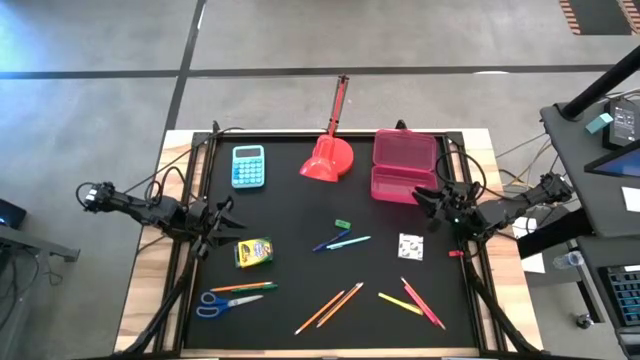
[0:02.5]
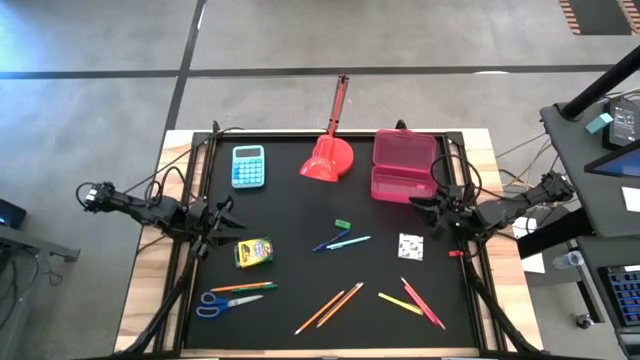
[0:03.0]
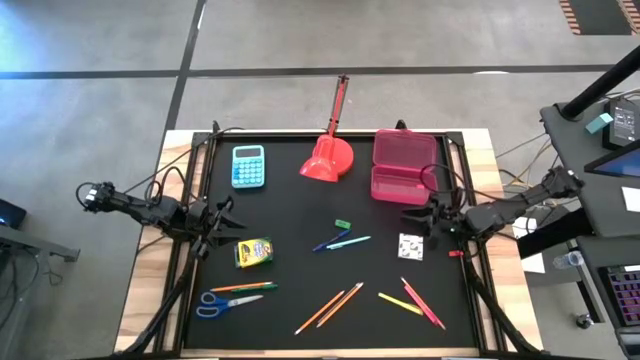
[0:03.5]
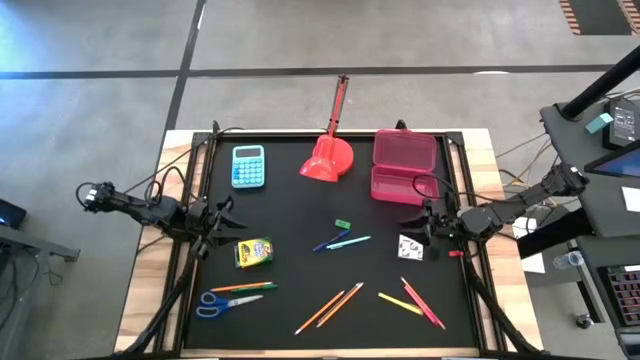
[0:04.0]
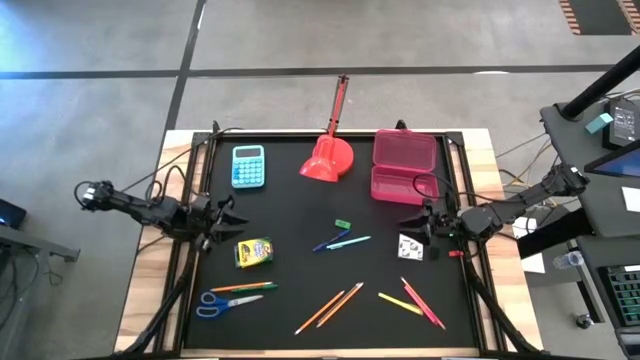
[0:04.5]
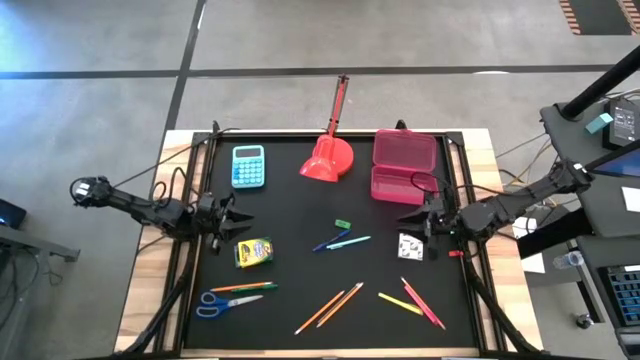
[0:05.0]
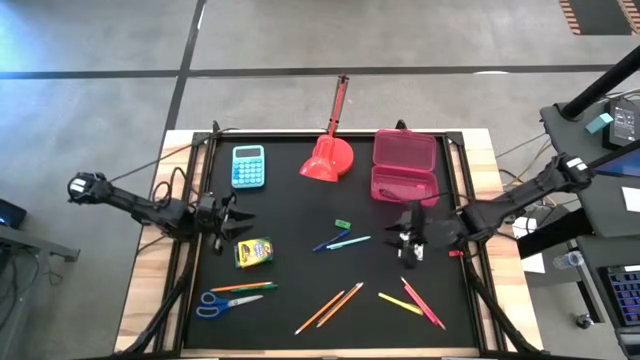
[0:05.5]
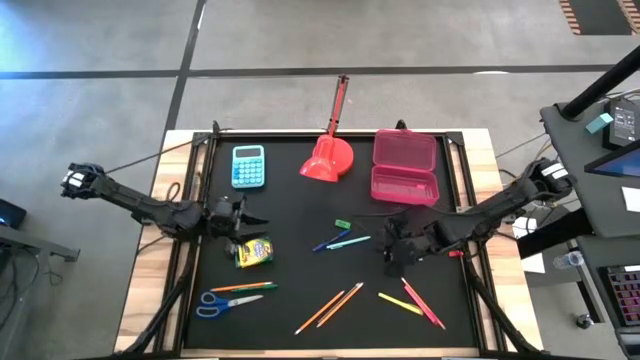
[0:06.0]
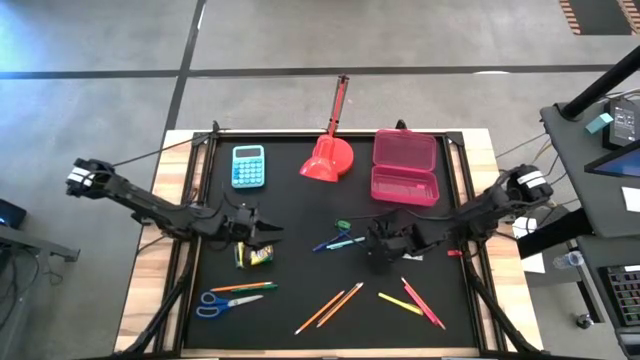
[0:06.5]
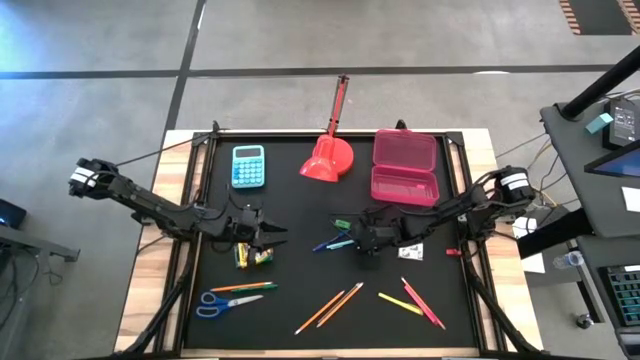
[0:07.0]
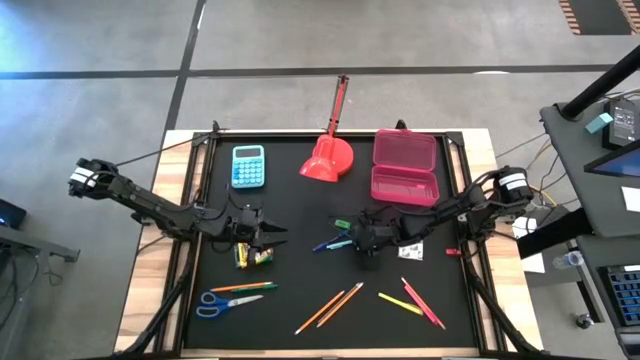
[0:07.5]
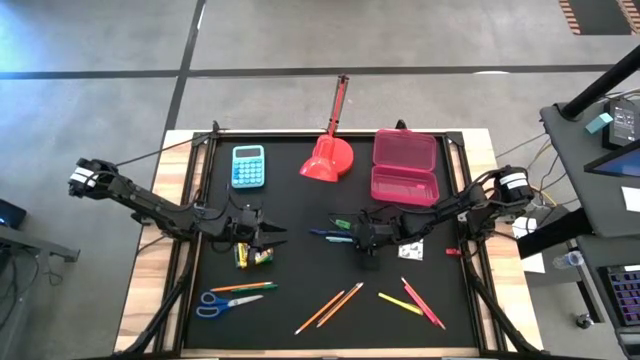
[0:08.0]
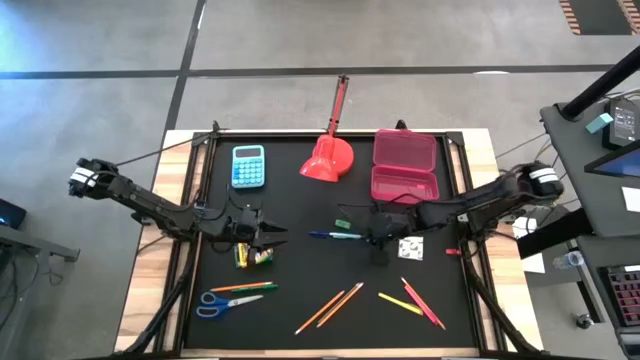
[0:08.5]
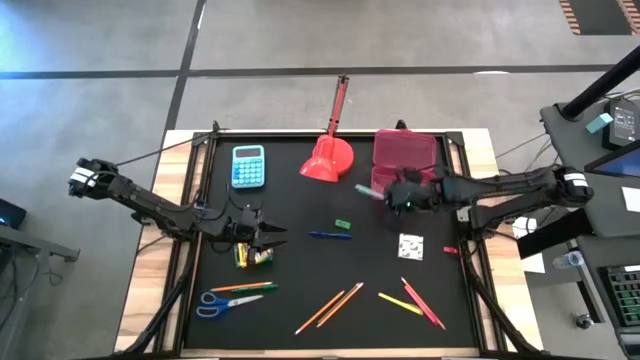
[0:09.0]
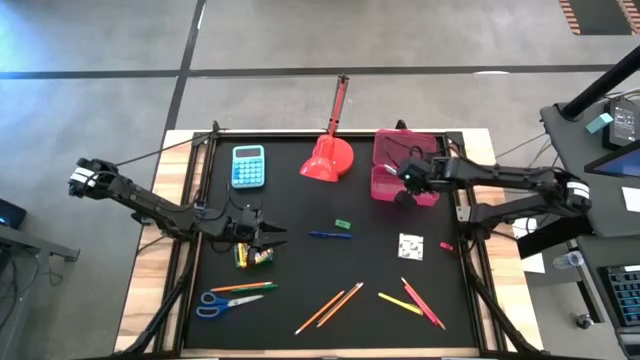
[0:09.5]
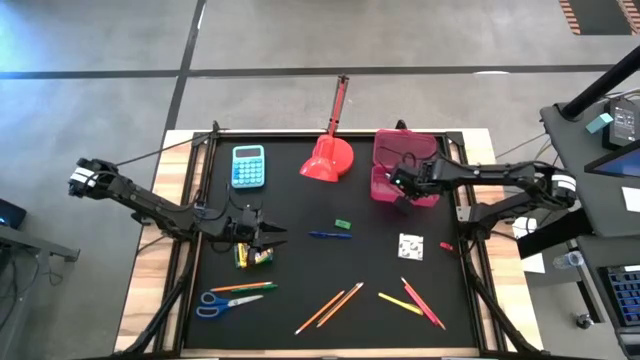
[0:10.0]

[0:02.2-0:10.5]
Task: Pack school essentials
Put the light blue pen into the pink supply box

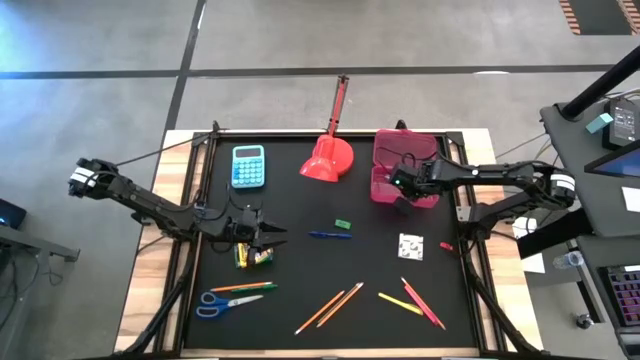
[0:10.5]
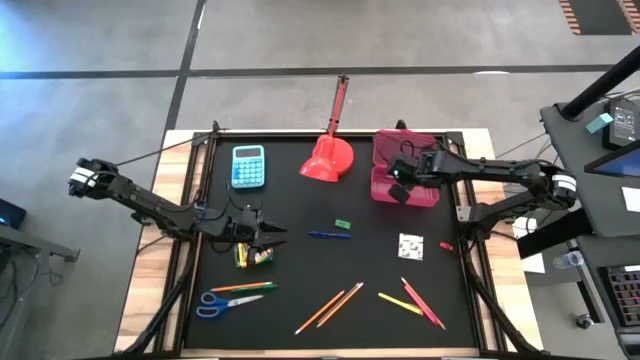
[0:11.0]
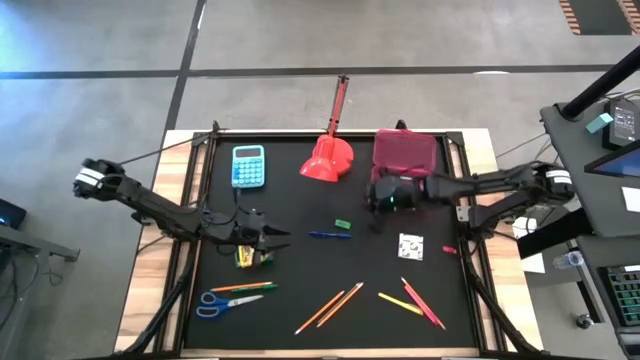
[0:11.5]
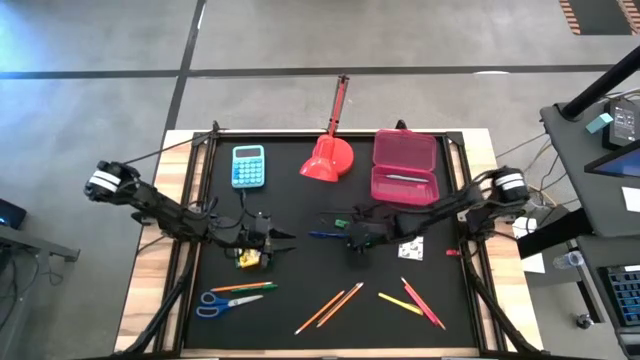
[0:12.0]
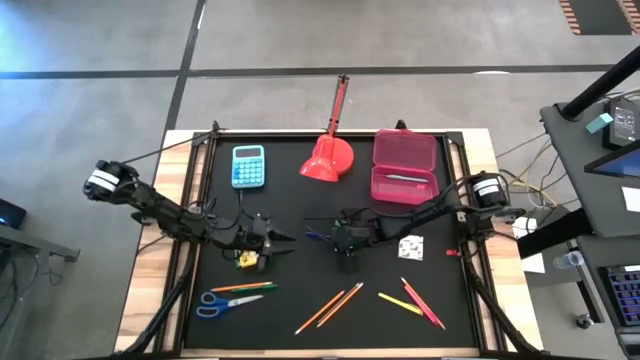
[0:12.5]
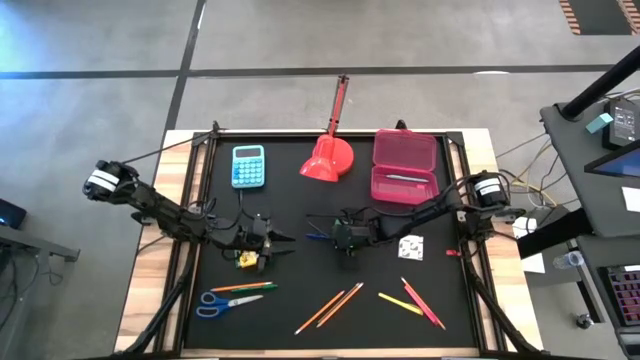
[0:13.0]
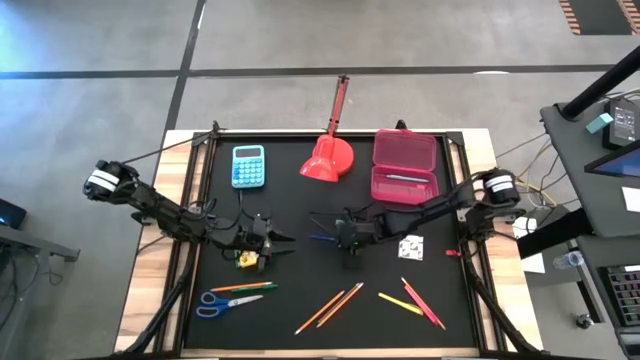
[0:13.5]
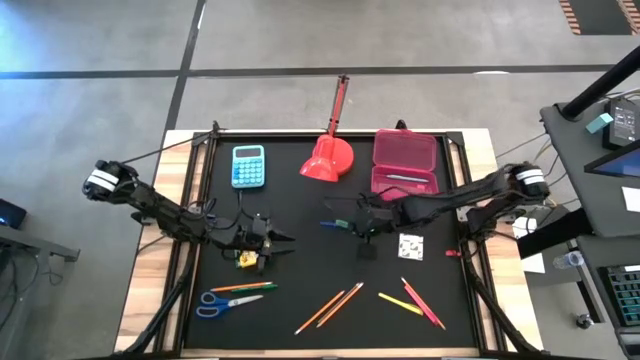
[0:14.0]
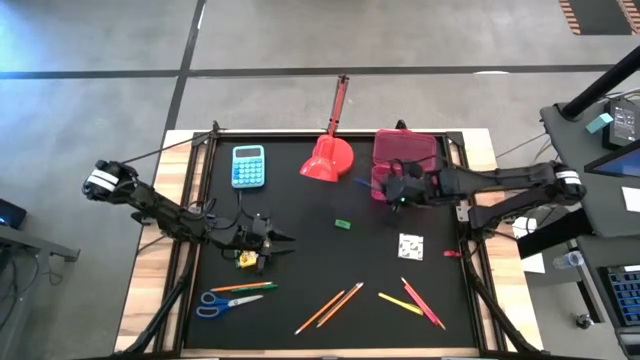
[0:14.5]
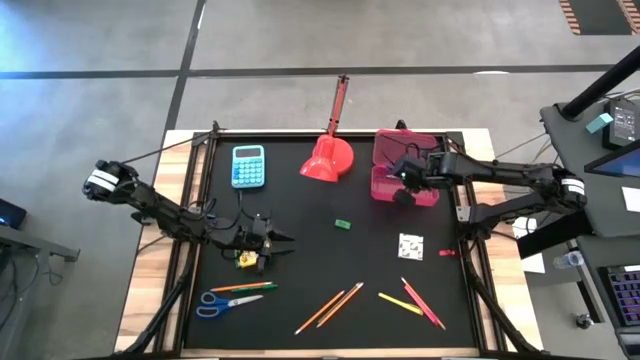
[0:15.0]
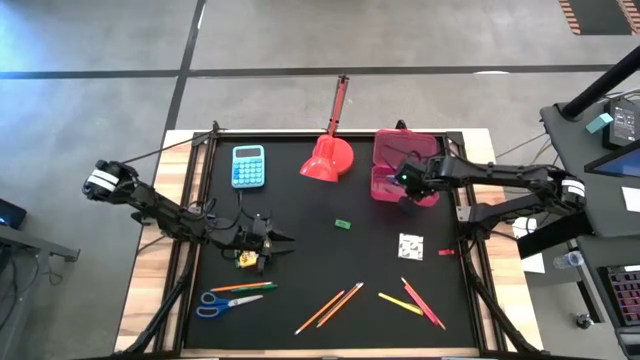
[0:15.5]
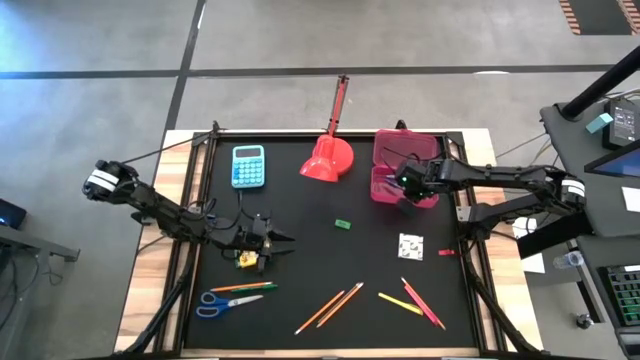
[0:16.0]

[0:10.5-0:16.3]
Put the blue pen into the pink supply box

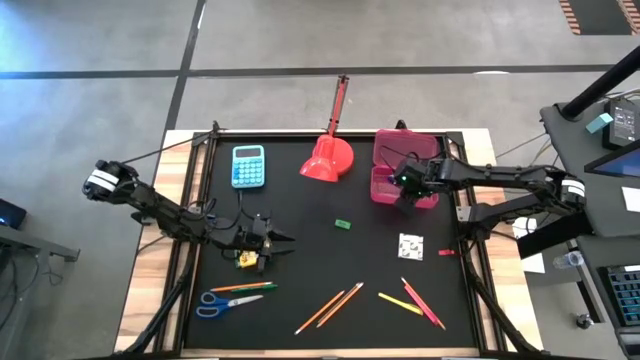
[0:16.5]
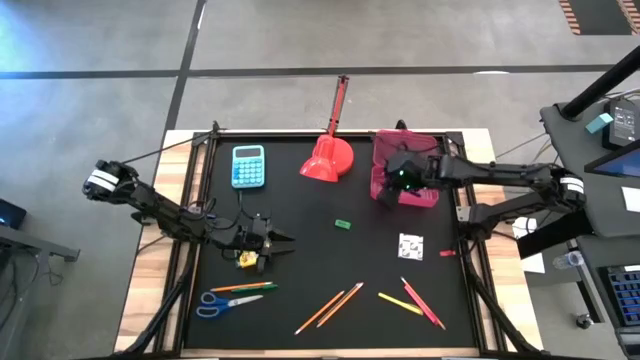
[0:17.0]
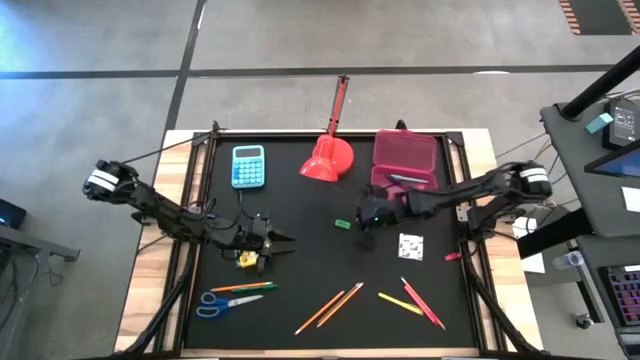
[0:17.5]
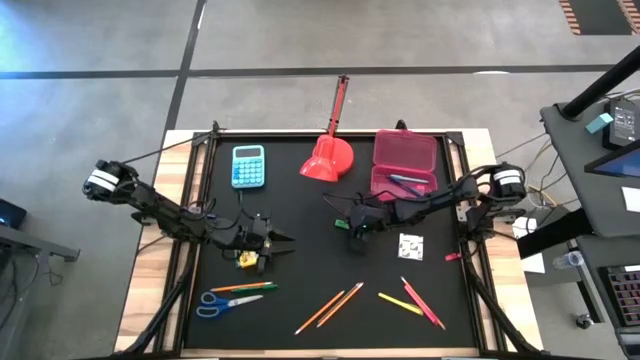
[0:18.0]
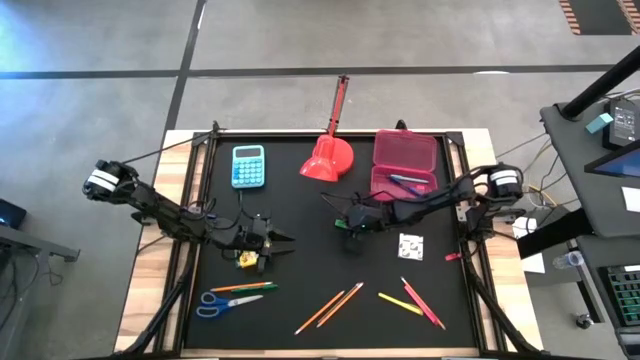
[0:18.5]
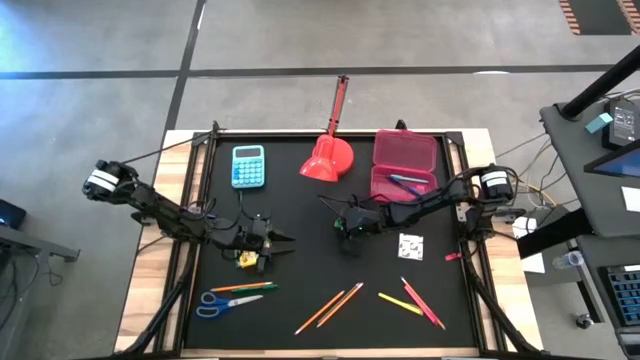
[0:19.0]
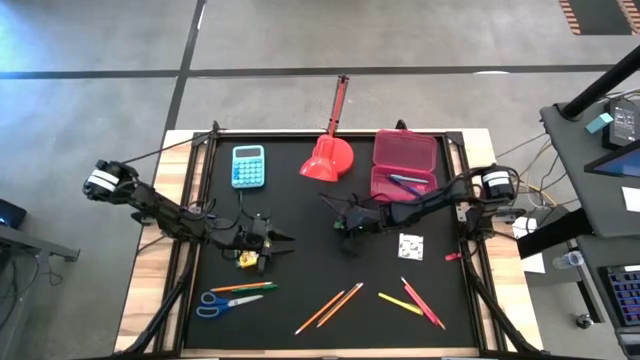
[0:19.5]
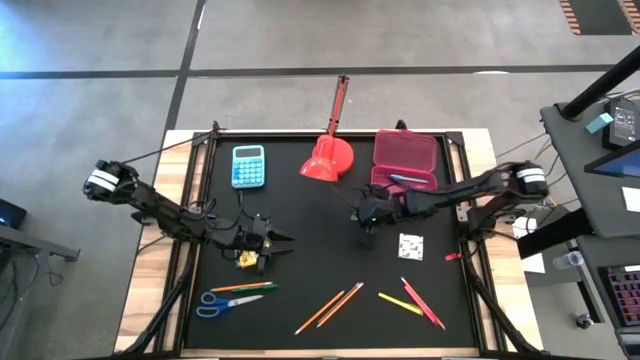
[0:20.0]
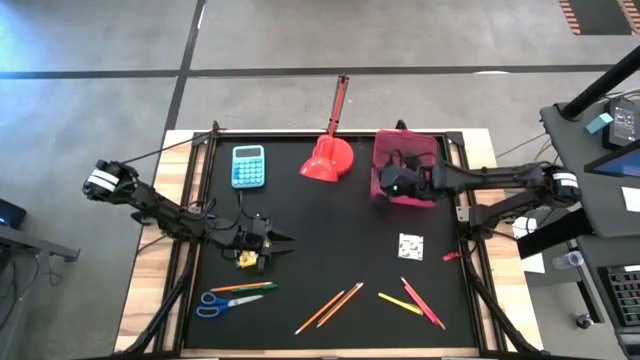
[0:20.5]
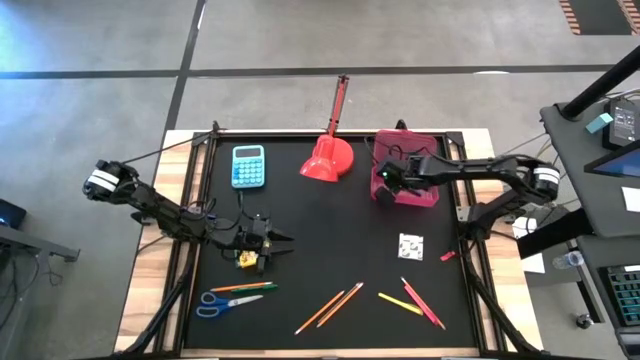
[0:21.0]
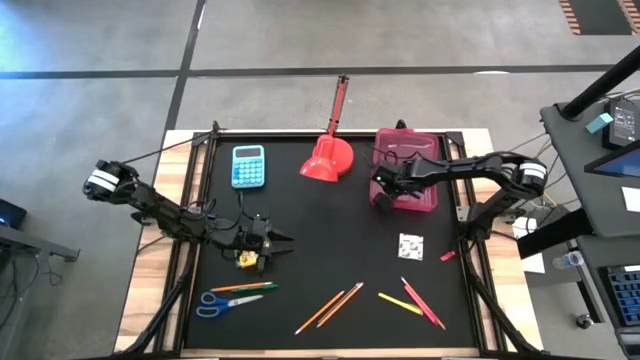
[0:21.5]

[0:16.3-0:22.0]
Put the green eraser into the pink supply box

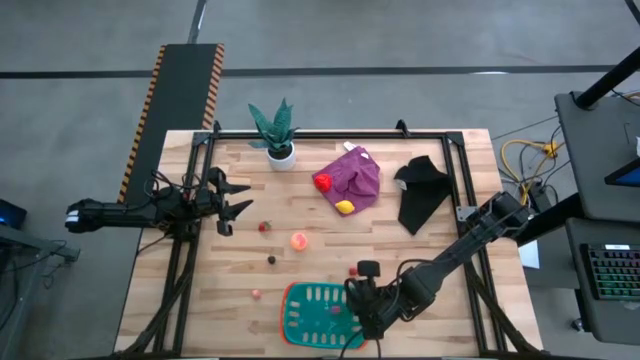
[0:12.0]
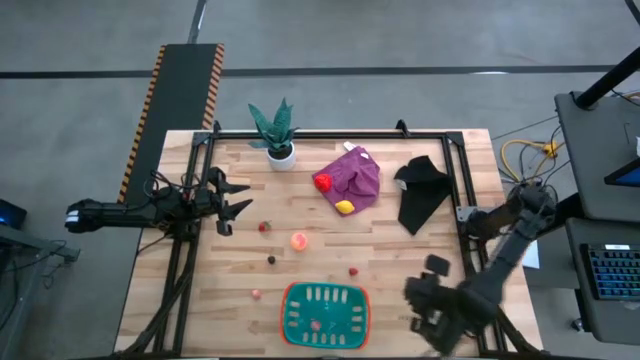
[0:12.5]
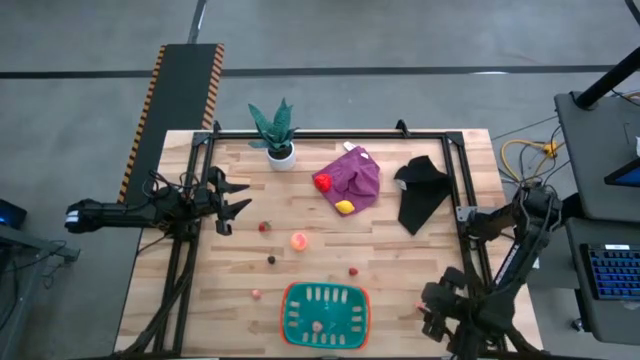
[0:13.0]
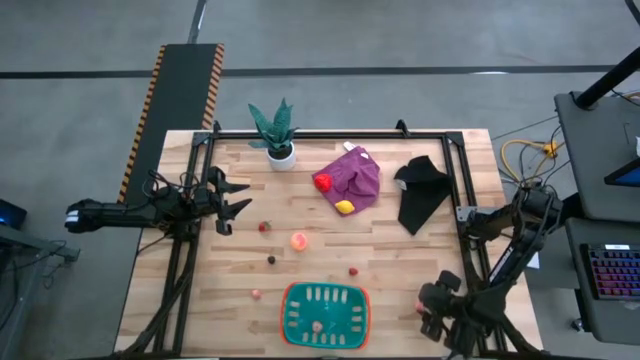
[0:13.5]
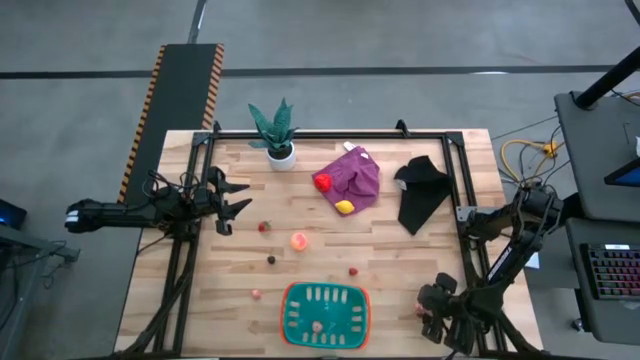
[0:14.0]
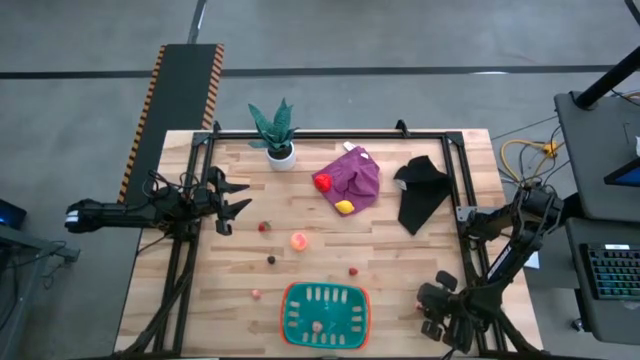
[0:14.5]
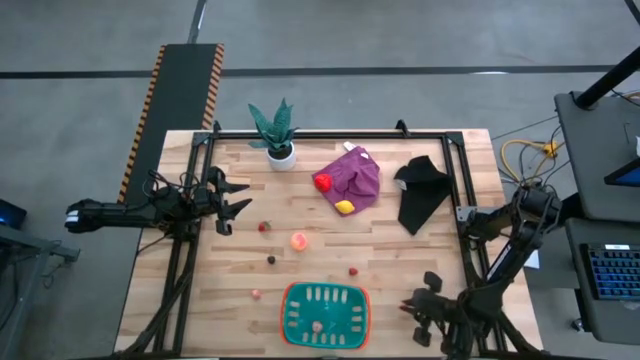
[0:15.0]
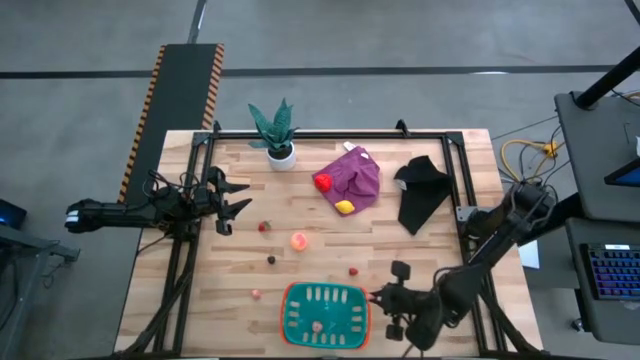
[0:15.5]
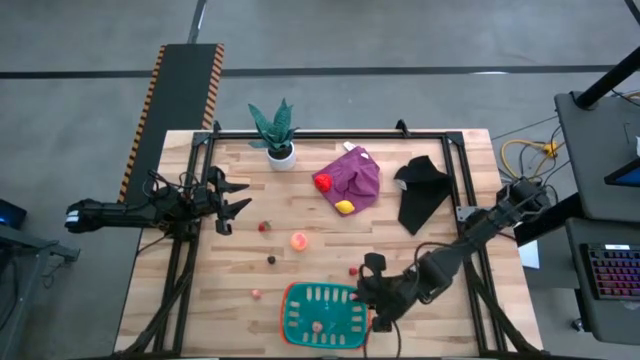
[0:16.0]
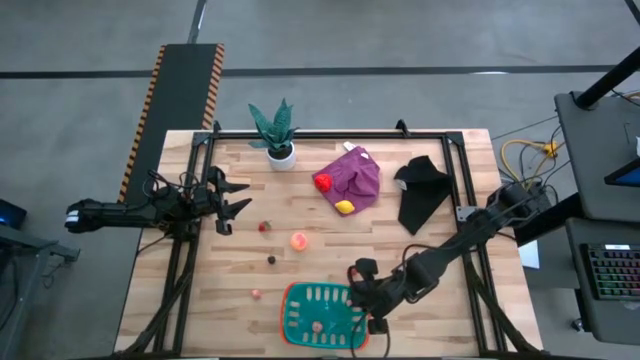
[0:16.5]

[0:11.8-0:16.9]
Task: Pick and placing Produce into tupperware
Put the pink peach into the green basket
